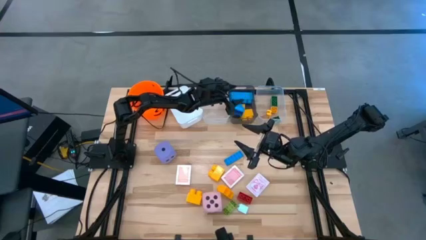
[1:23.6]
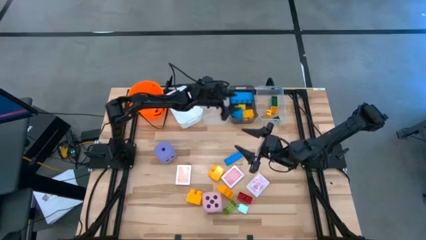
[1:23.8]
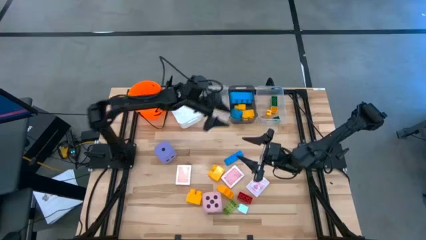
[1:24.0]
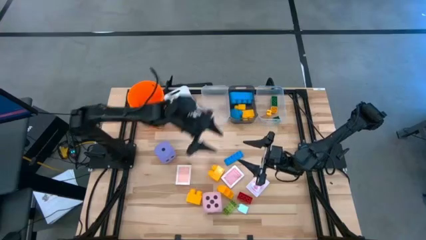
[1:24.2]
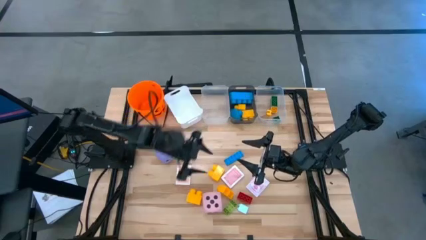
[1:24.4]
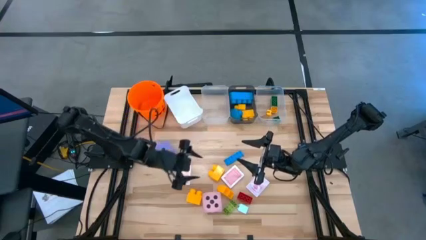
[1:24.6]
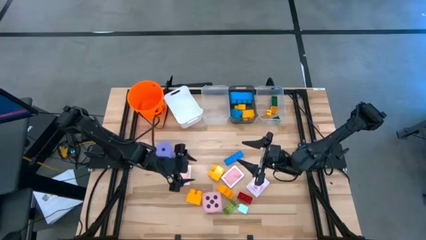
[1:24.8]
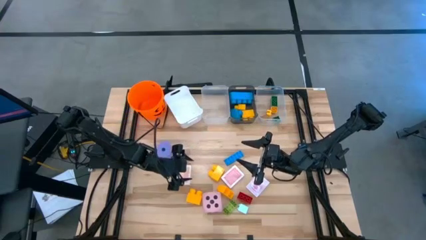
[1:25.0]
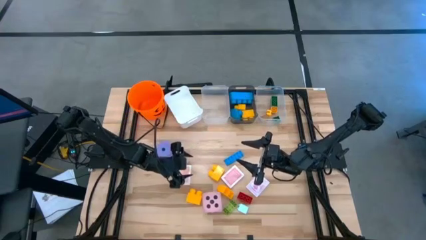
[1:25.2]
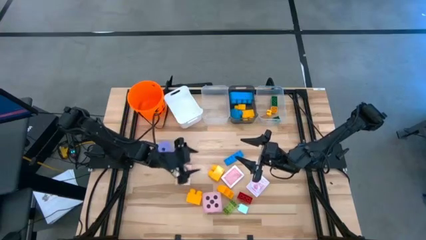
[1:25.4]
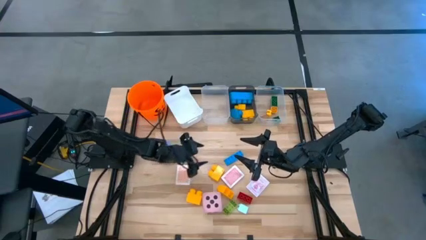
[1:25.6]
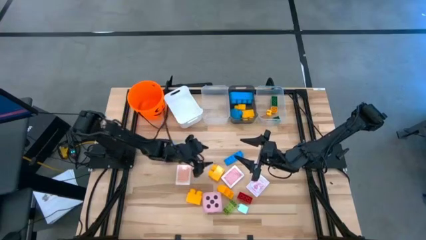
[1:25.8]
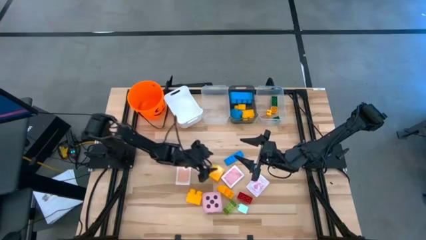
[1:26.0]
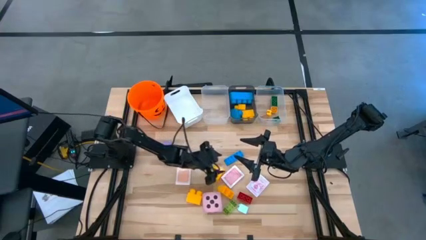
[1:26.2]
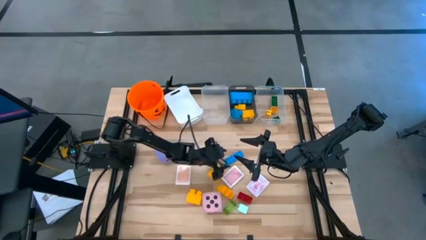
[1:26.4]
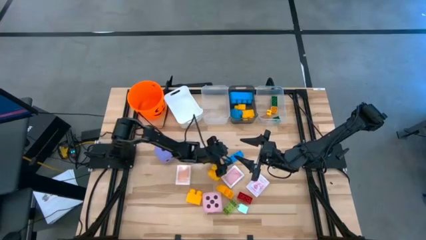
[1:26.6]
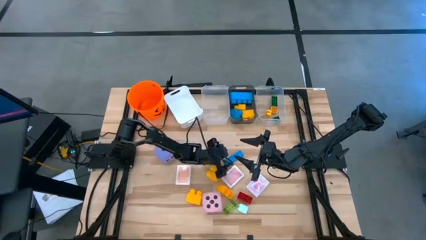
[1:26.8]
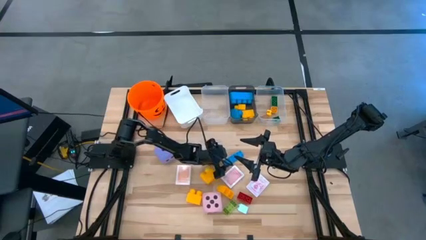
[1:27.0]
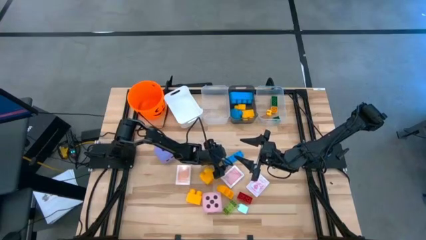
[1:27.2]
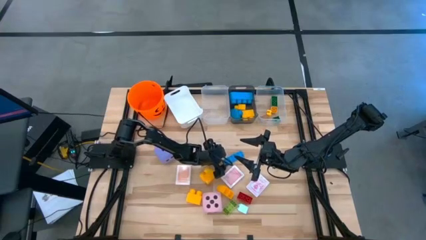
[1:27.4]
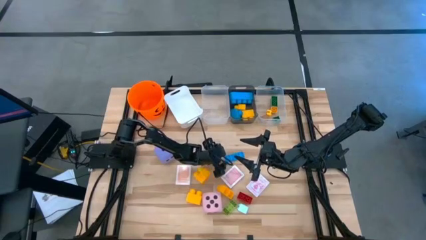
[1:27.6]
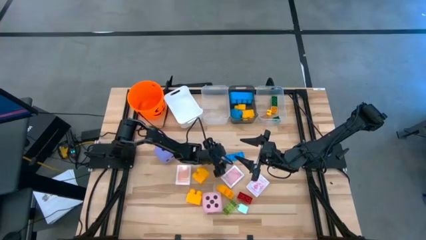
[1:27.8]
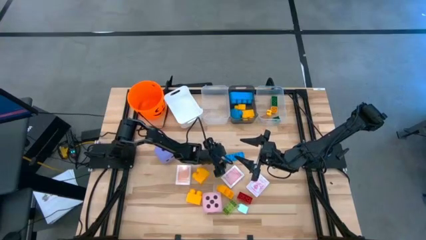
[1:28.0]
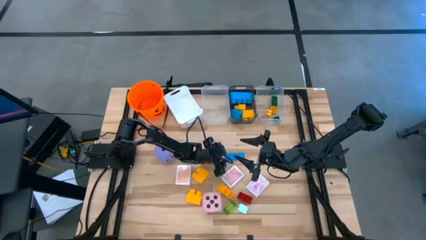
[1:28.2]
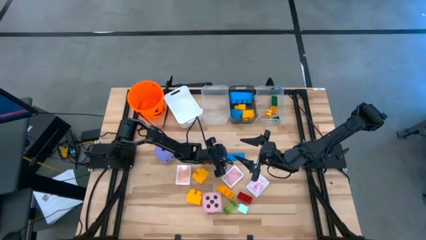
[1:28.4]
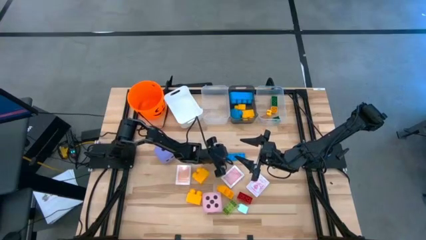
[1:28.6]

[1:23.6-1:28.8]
Task: Pick & Place Toys
Put the small blue game piece into the right transparent bin

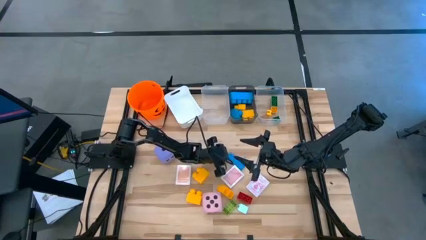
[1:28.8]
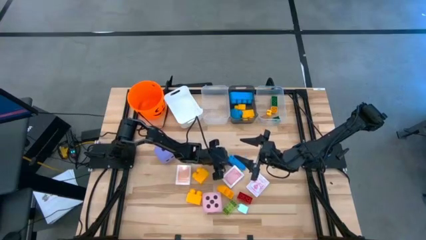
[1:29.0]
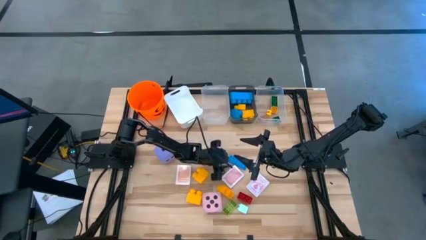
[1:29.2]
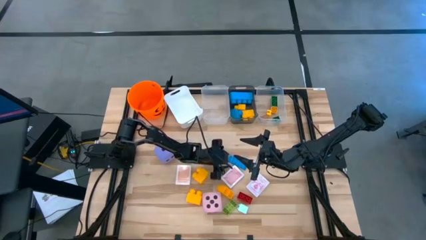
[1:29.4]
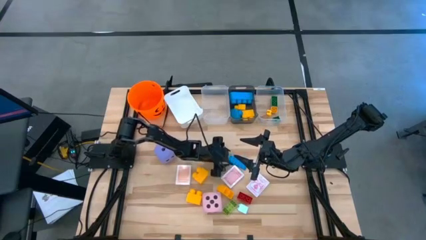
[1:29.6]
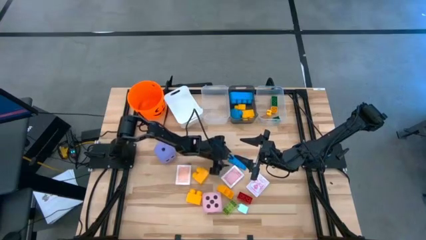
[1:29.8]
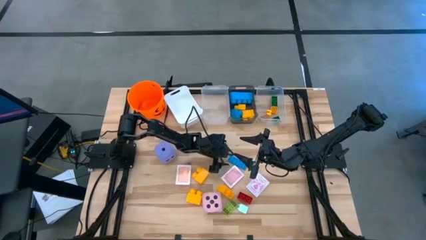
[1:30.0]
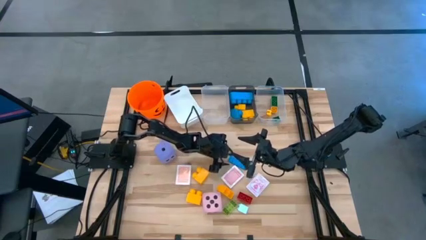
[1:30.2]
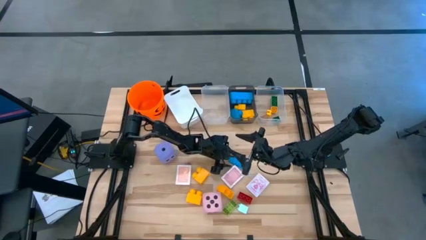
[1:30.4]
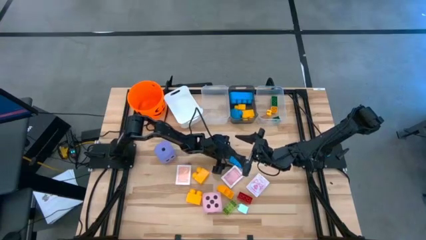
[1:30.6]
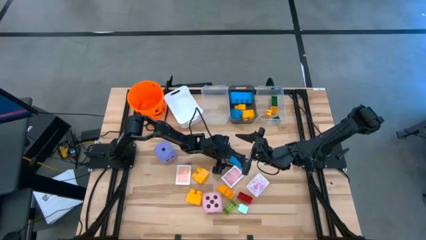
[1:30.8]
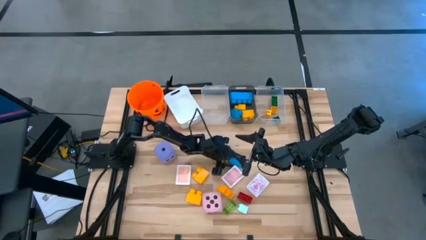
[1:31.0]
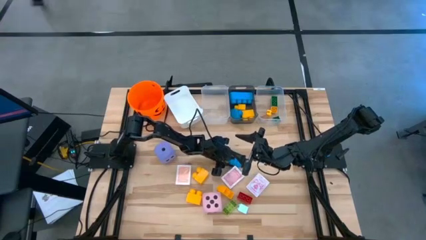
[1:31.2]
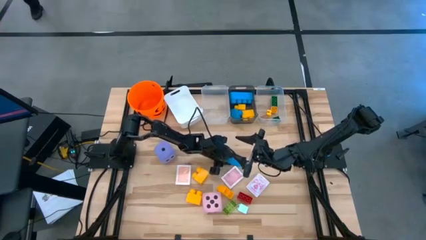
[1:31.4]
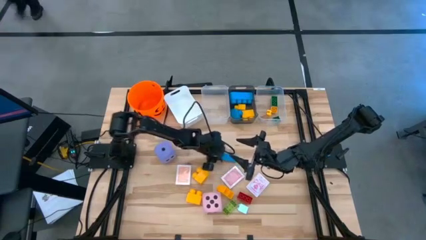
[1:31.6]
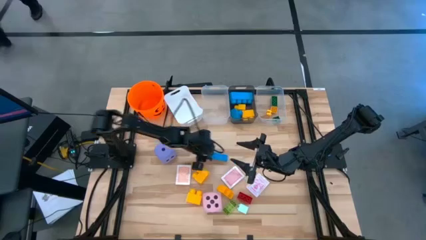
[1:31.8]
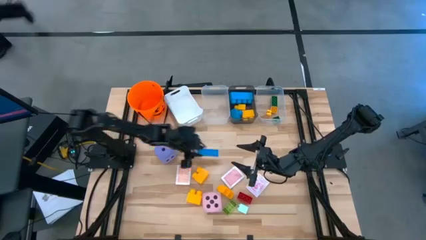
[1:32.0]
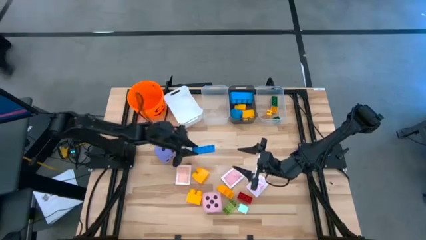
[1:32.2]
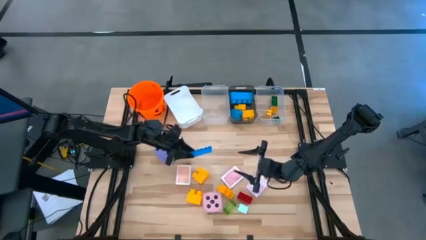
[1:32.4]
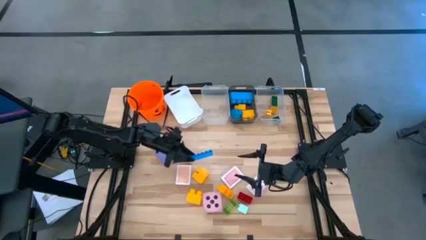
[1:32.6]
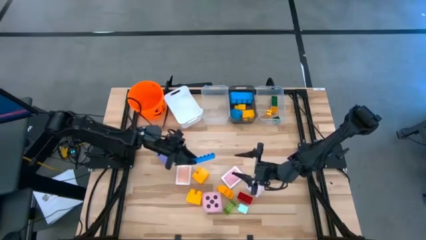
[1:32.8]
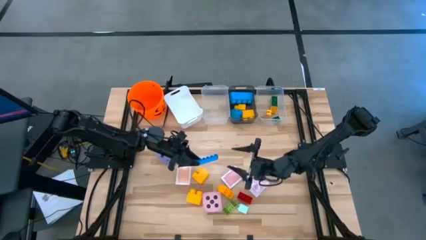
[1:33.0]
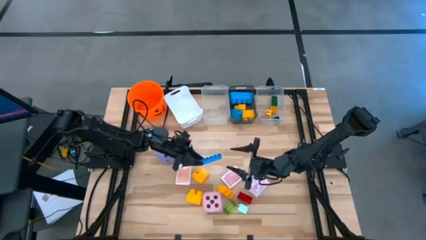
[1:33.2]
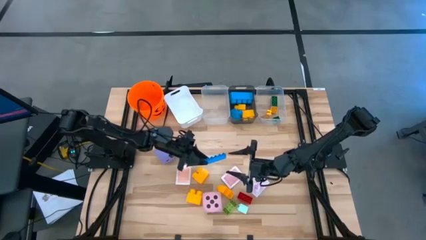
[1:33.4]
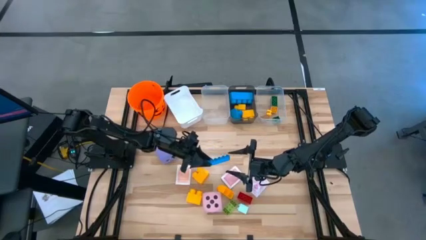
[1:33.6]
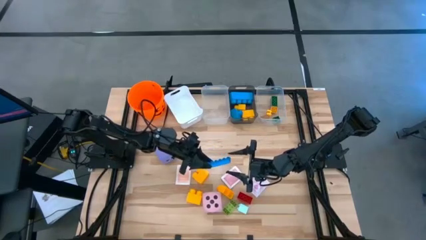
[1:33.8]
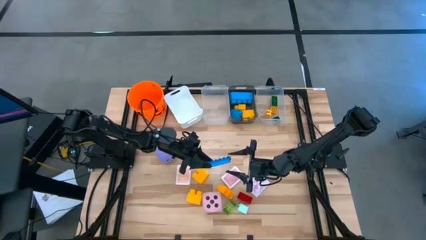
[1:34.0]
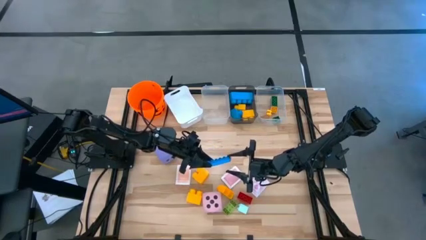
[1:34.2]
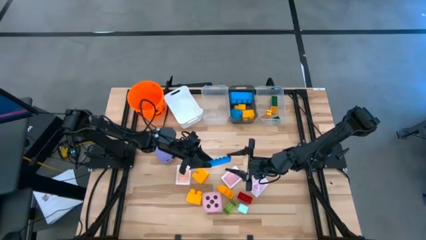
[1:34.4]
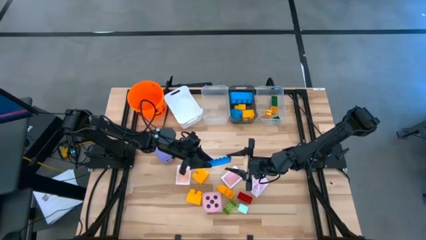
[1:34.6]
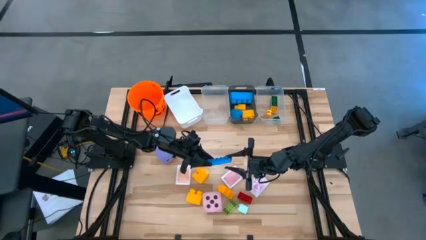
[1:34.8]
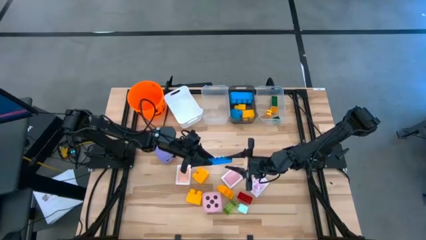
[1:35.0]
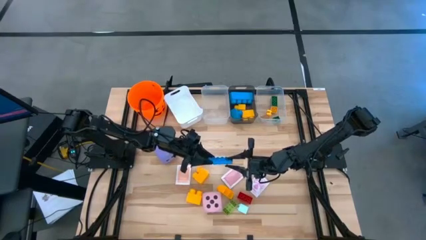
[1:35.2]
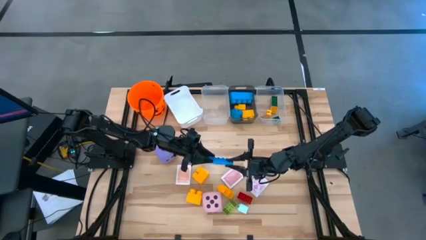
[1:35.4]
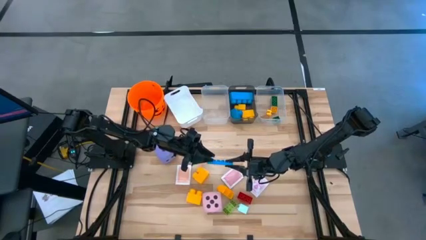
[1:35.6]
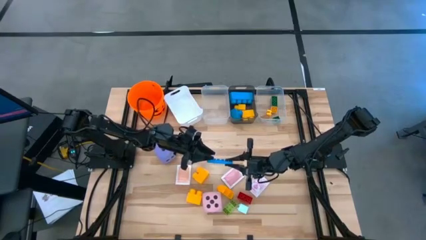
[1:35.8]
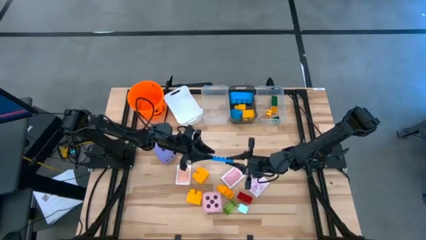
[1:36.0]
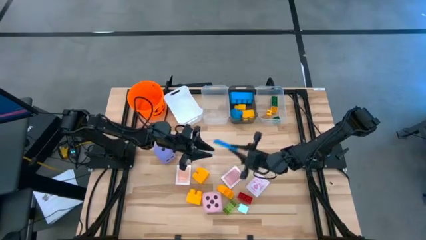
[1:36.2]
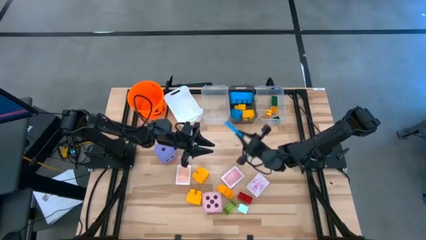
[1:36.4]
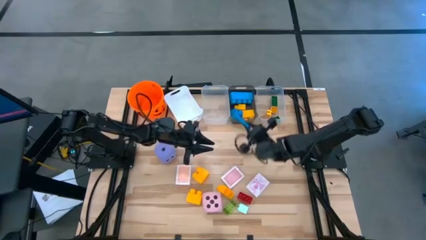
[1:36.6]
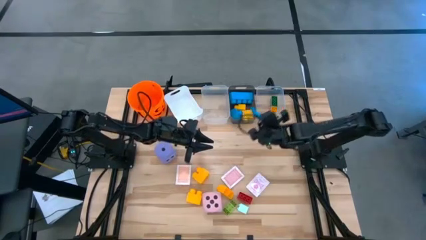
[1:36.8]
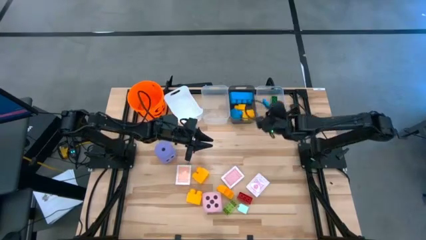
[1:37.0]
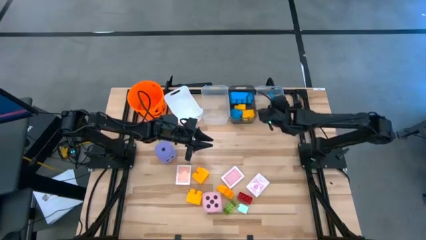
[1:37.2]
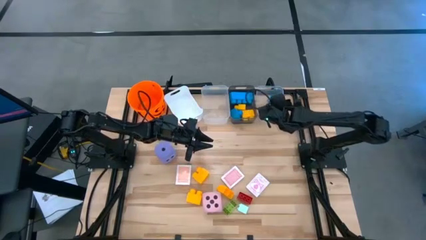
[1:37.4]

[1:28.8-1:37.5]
Put the small blue game piece into the right transparent bin
